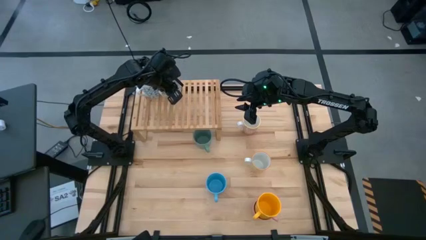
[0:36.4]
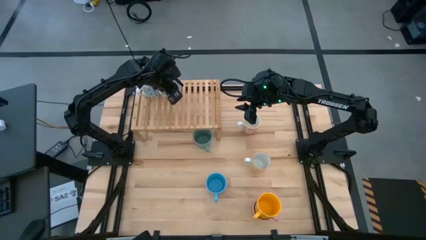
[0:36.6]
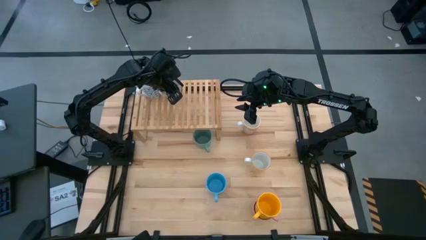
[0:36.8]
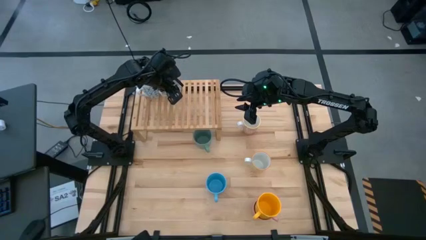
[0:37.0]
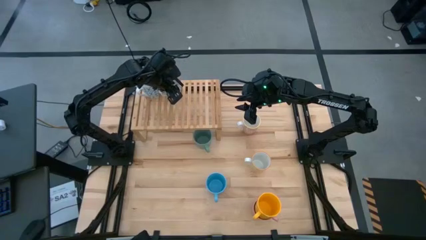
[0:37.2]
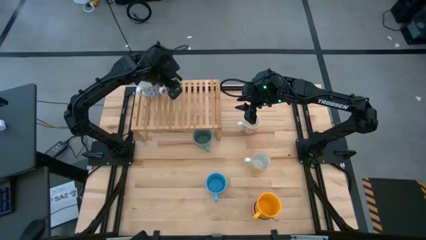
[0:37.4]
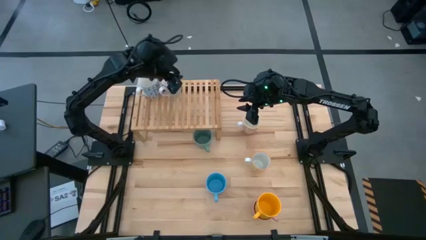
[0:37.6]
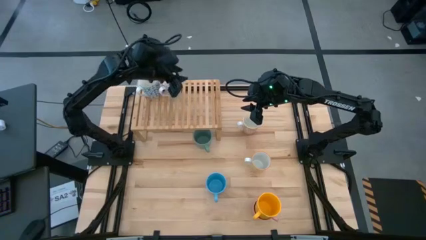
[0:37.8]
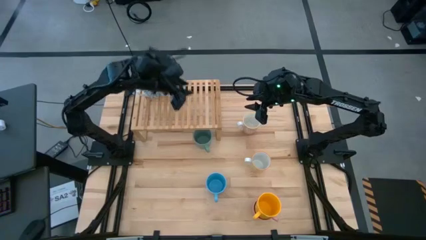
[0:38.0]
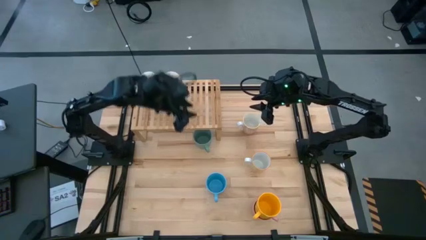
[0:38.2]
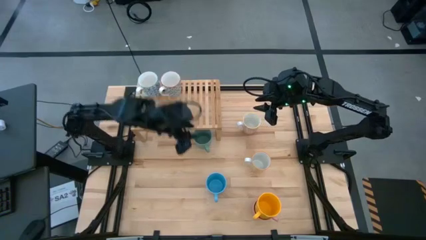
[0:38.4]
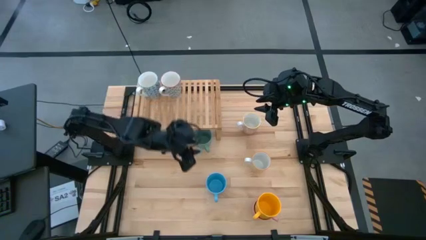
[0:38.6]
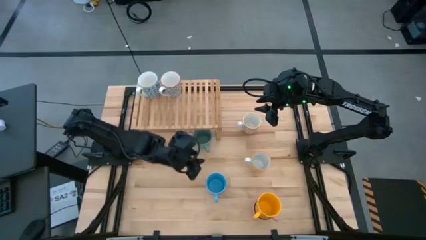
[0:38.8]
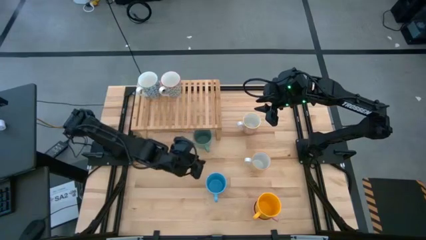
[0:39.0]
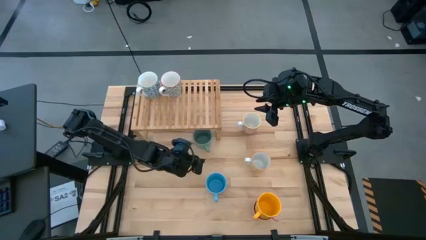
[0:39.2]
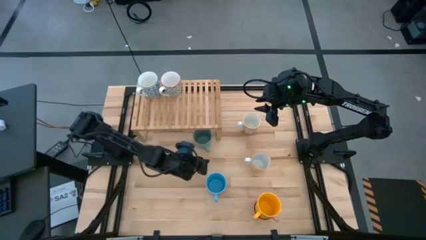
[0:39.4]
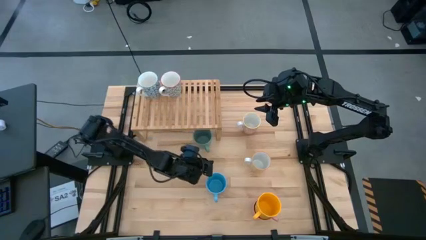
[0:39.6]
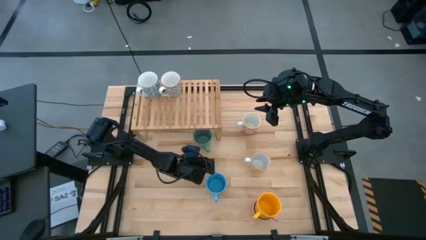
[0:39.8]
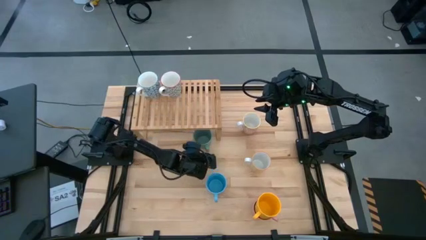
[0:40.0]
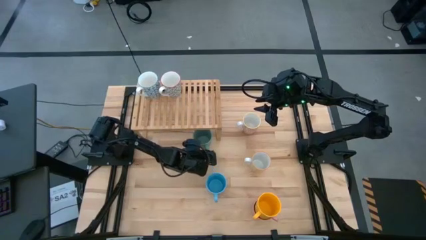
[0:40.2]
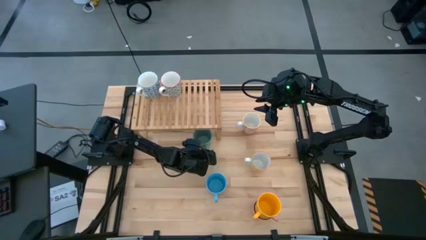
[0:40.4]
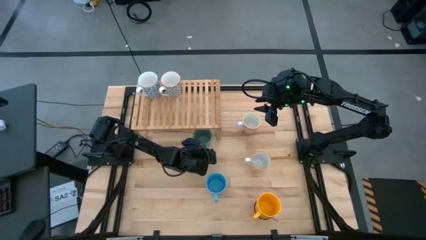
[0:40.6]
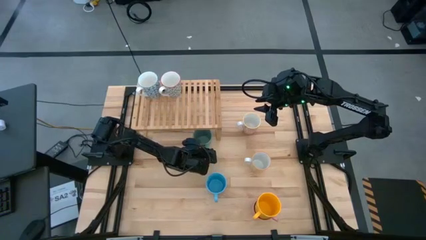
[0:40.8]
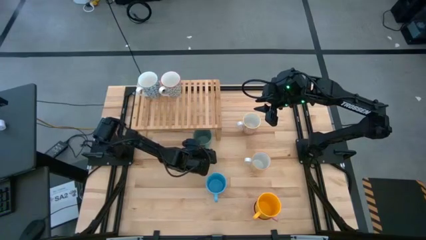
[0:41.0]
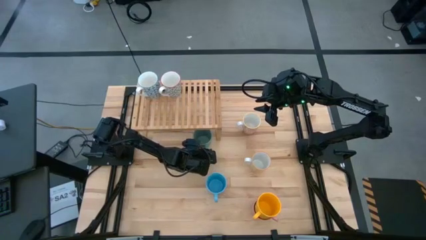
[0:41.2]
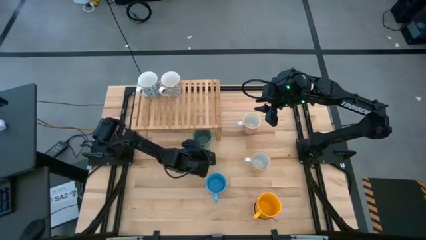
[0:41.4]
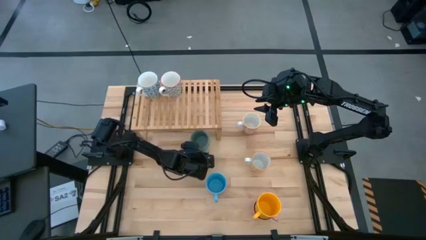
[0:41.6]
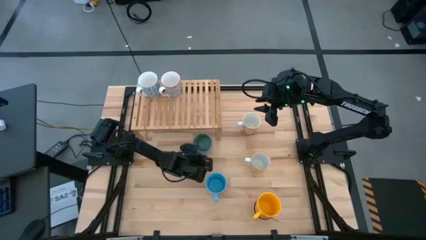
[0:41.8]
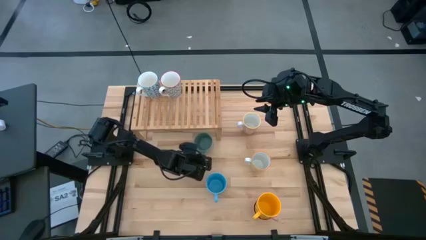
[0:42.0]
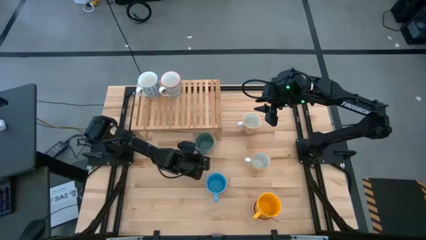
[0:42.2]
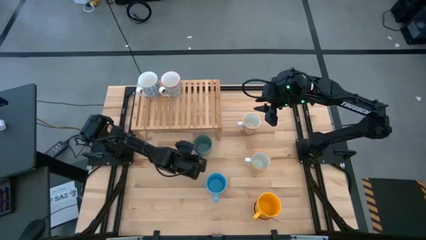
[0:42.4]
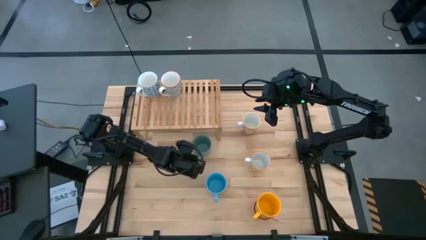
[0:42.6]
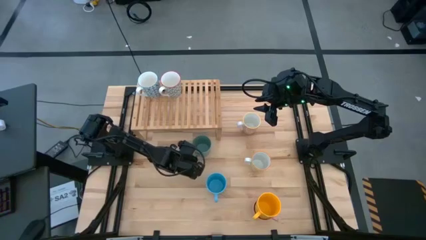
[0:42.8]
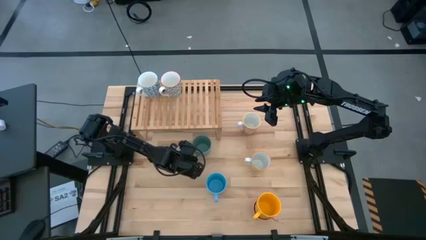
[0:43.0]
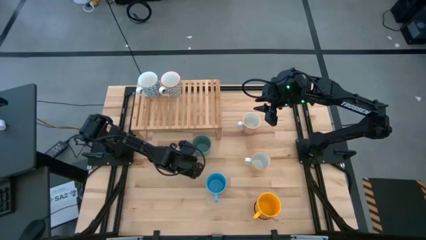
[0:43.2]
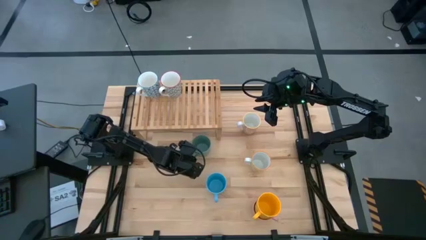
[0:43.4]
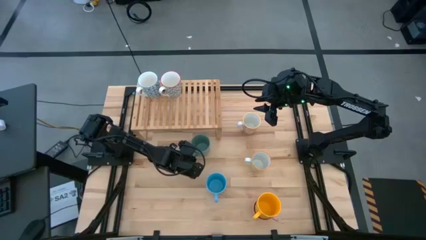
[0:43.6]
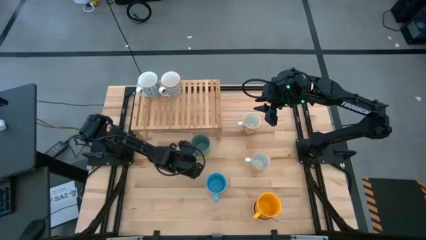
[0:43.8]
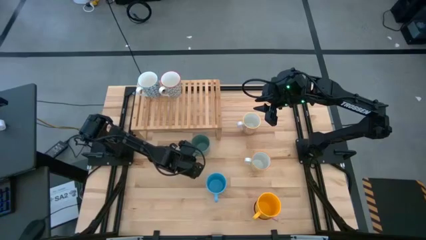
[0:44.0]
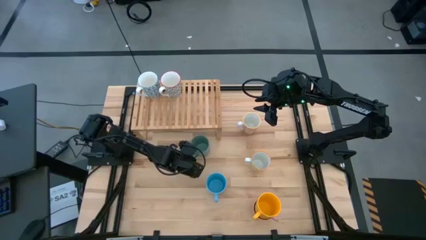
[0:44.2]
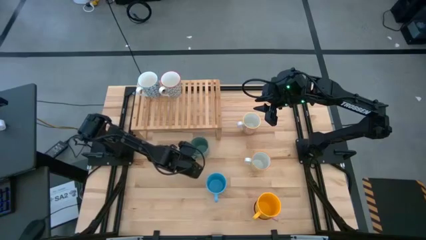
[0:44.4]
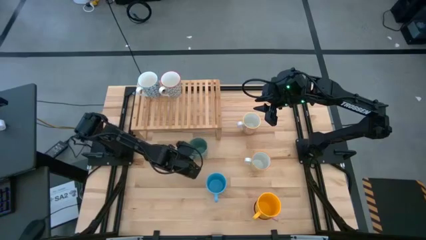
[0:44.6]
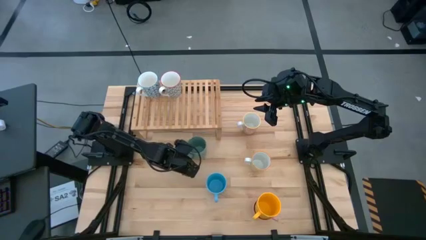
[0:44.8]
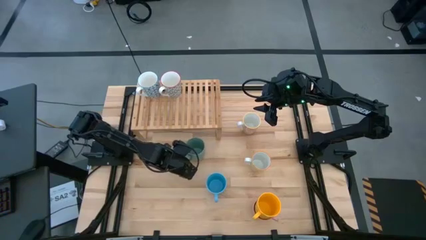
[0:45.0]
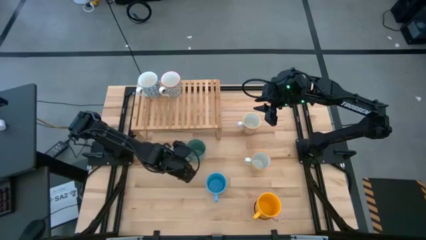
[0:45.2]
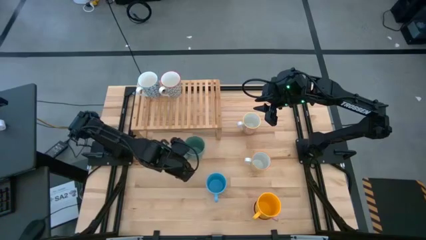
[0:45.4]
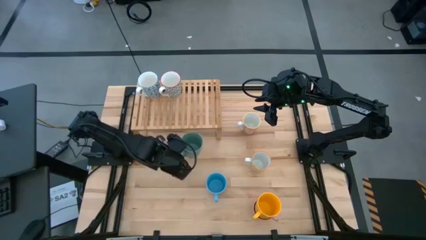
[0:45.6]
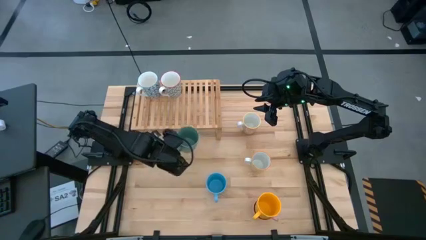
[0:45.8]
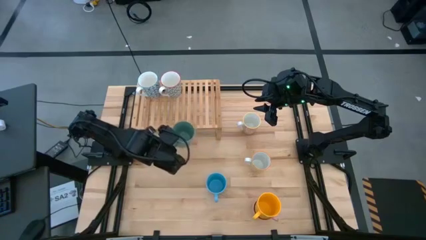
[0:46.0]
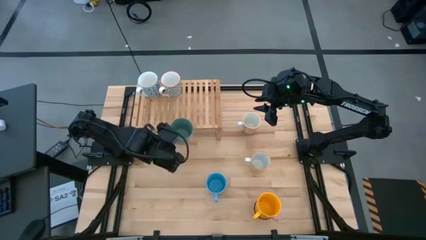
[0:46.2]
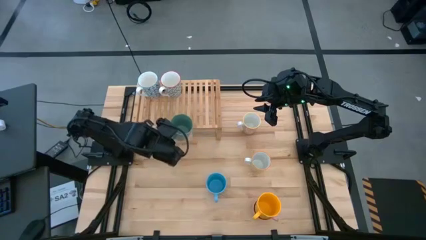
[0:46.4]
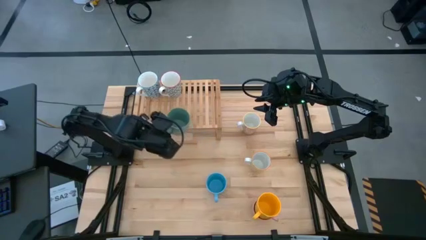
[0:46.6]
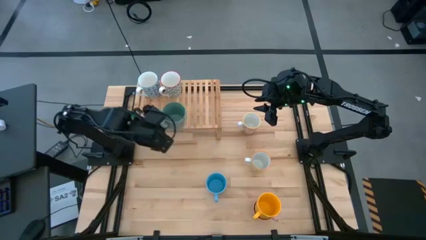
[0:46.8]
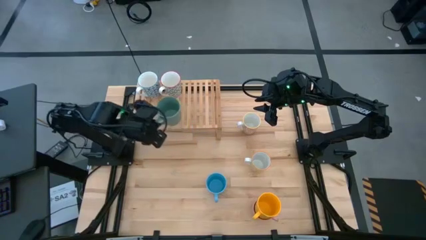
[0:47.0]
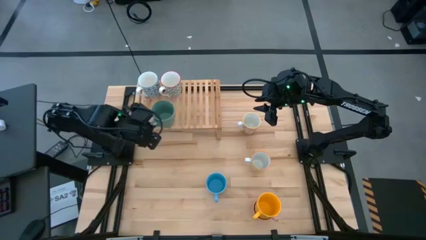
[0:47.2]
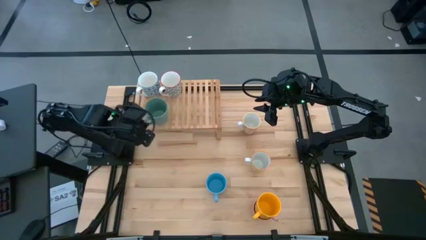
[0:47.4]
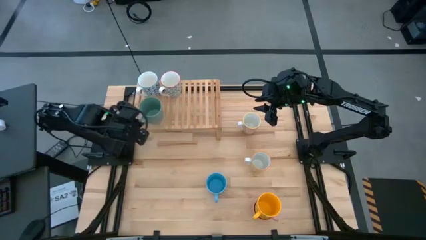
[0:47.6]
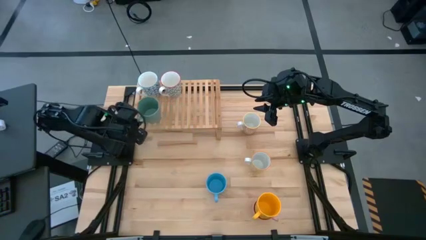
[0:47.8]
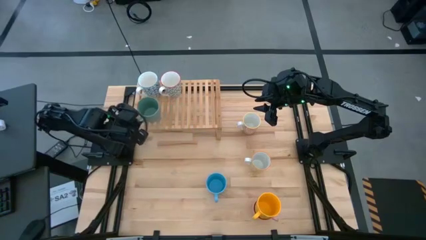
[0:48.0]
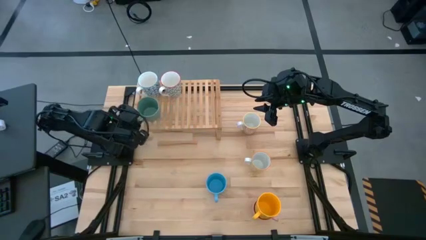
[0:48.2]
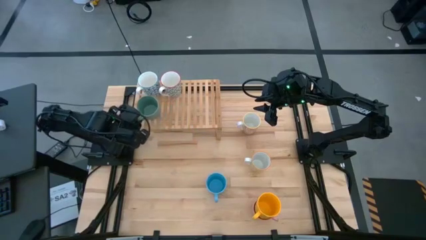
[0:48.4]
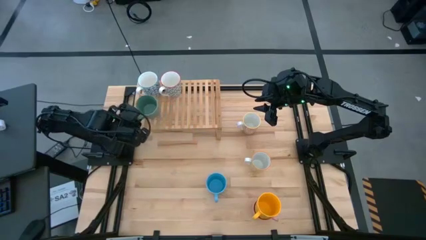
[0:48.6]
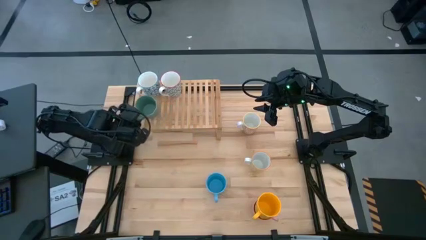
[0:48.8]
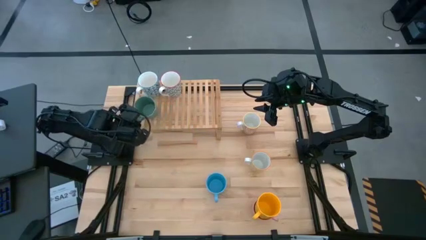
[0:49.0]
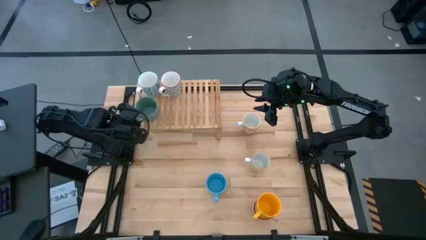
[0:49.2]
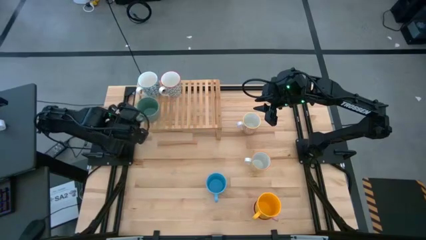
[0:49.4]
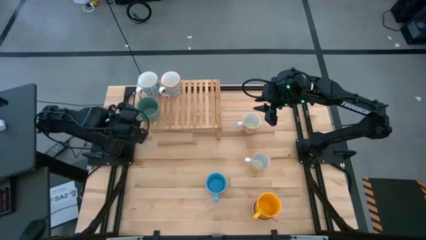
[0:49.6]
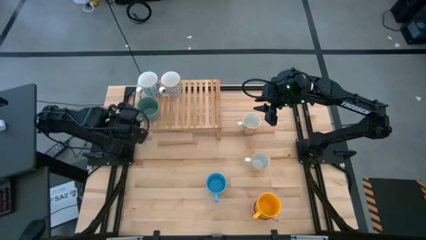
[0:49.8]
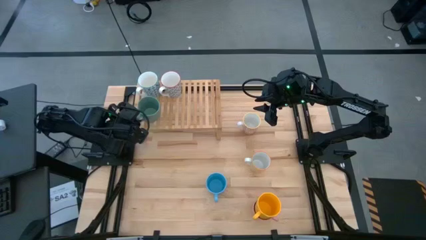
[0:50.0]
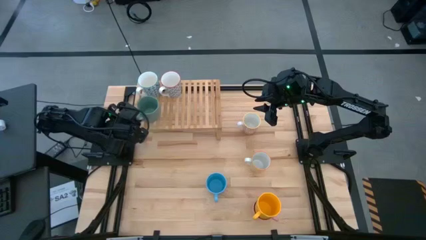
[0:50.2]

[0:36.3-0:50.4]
Task: Place coffee mugs
Put the dark green mug on the shelf
